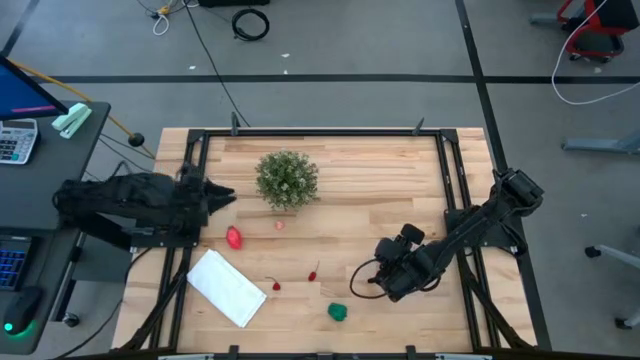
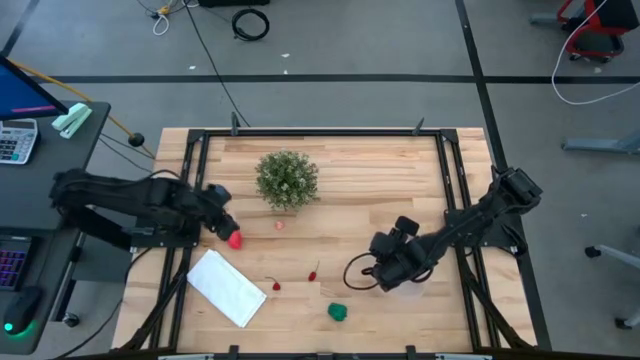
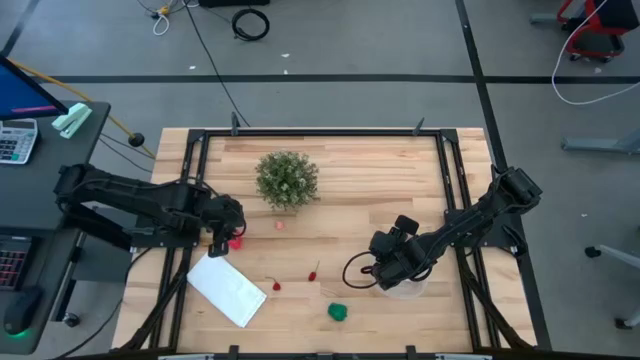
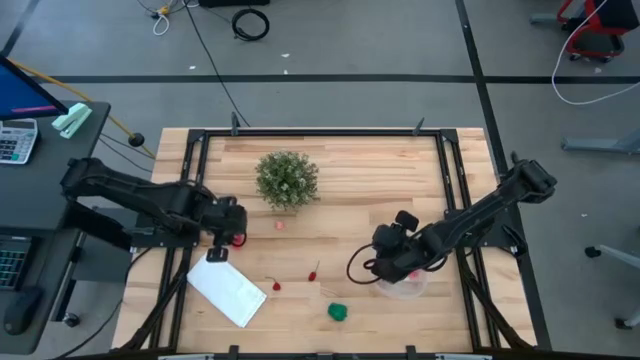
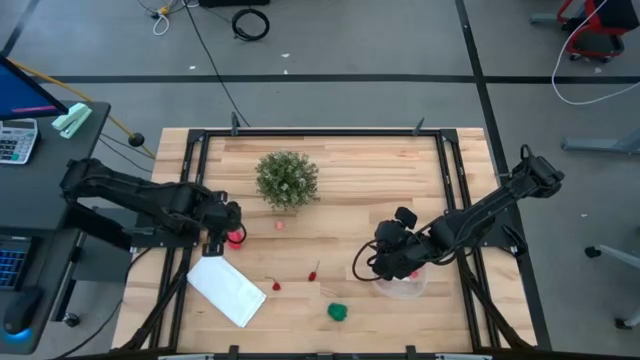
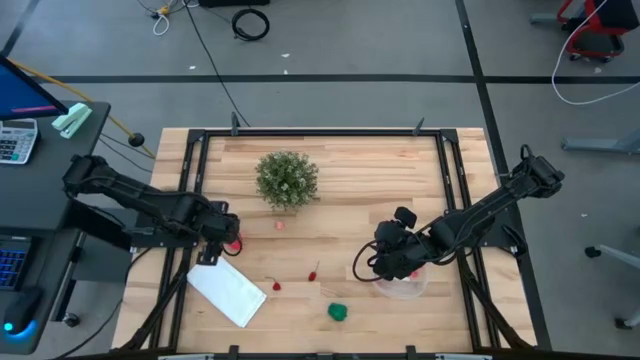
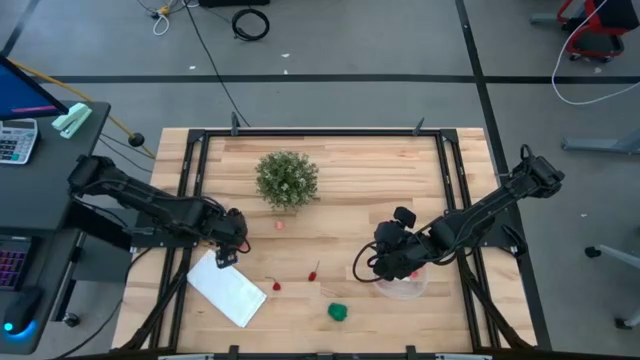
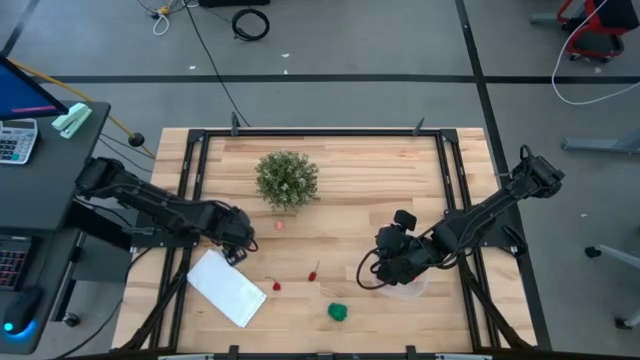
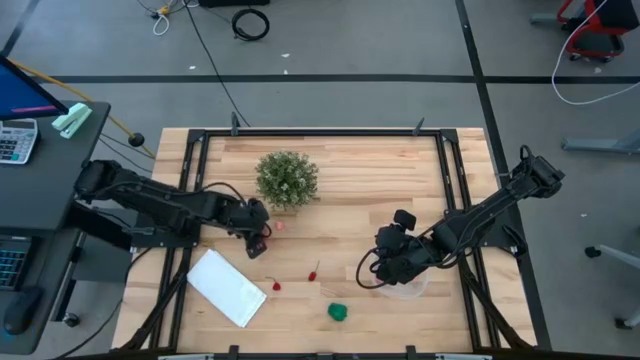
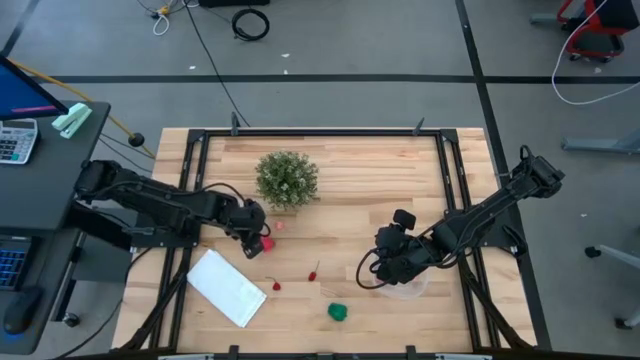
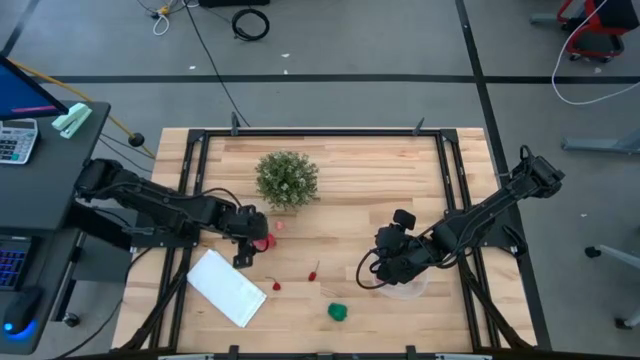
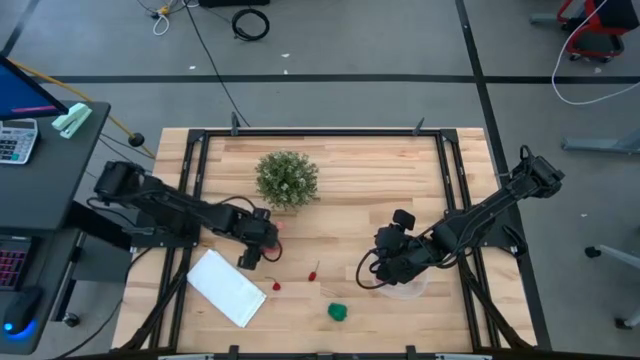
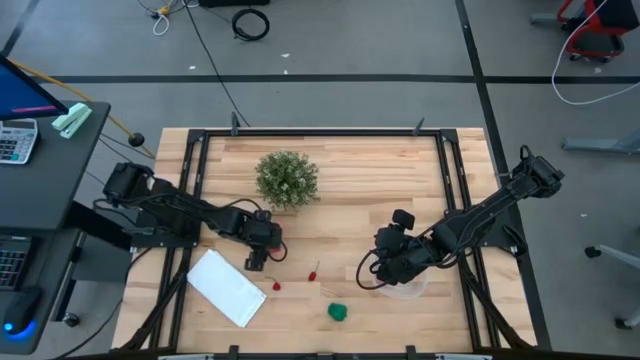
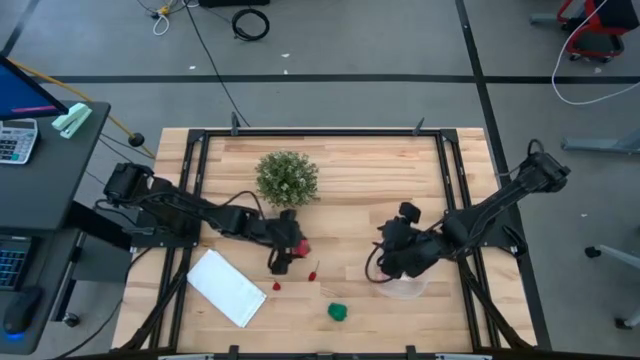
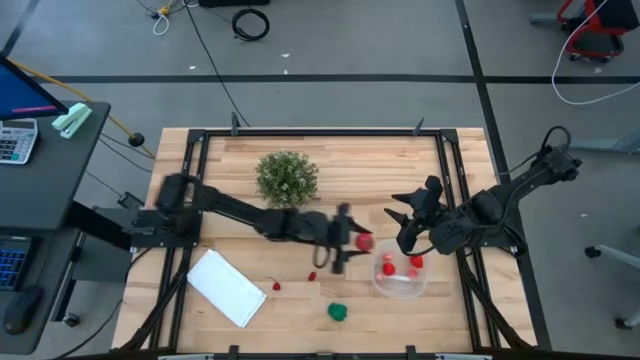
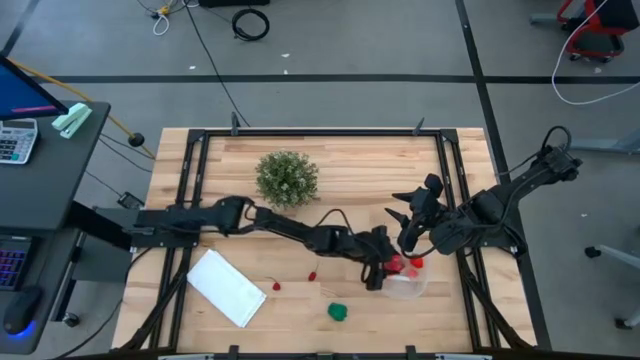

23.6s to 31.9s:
Task: Pick and placing Produce into tupperware
Put the dragonfruit into the transparent container

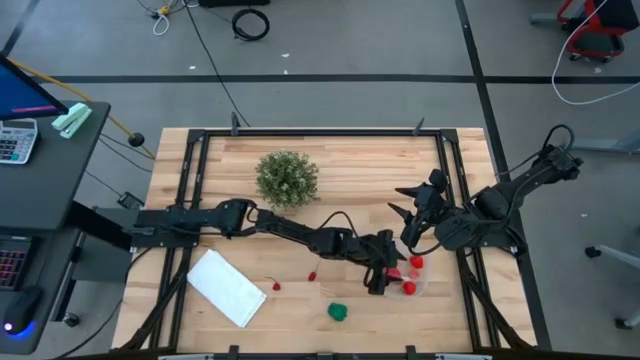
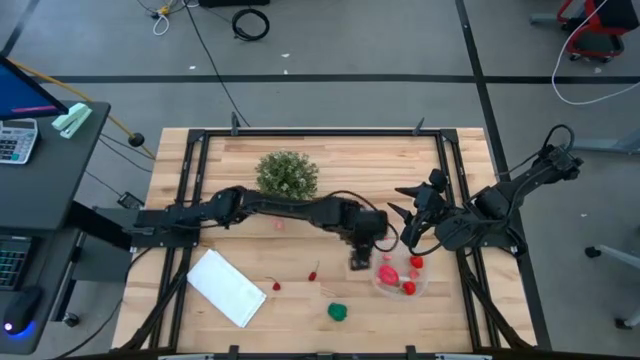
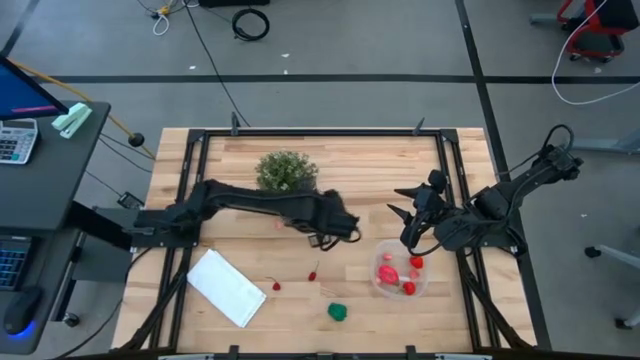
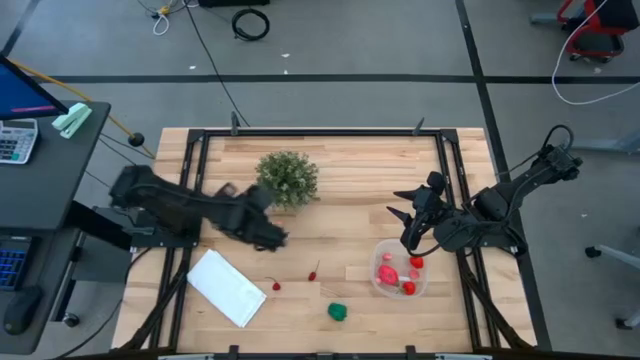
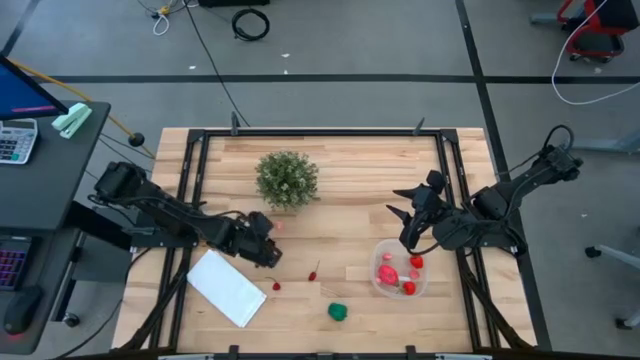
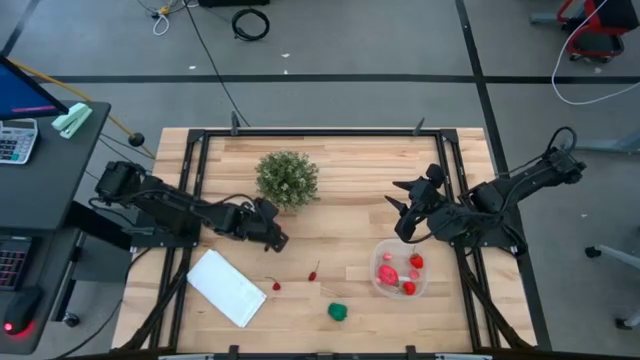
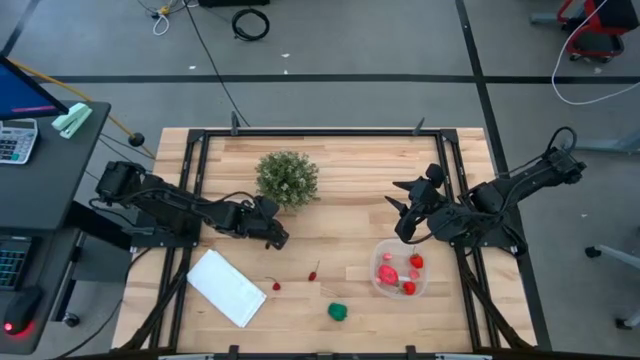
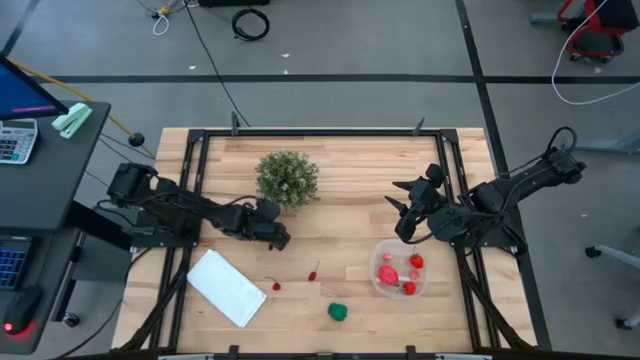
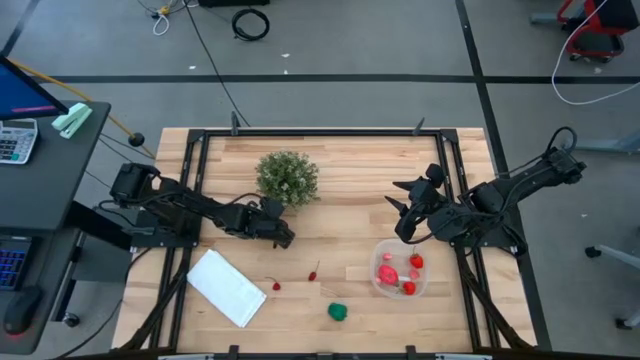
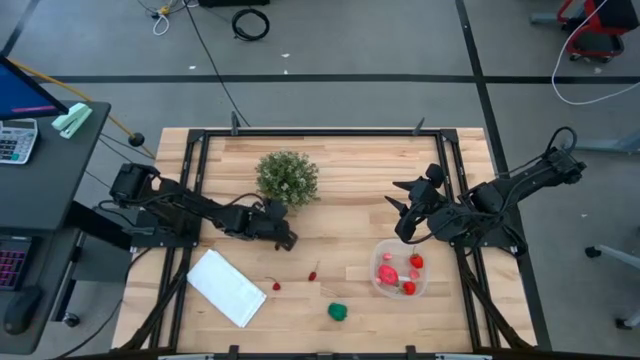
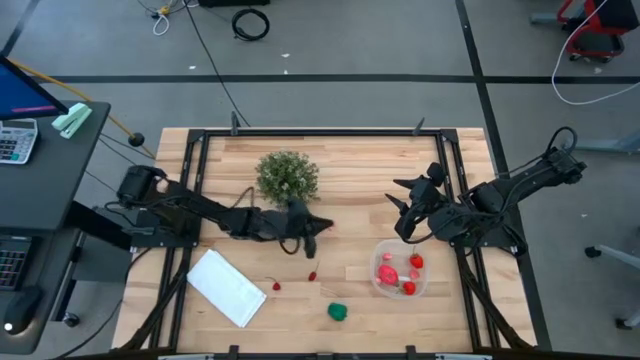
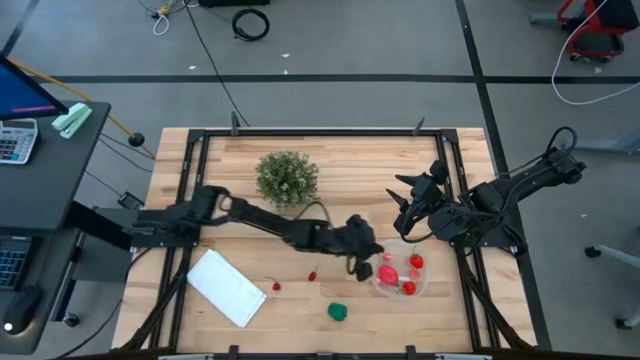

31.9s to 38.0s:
Put the apricot into the transparent container

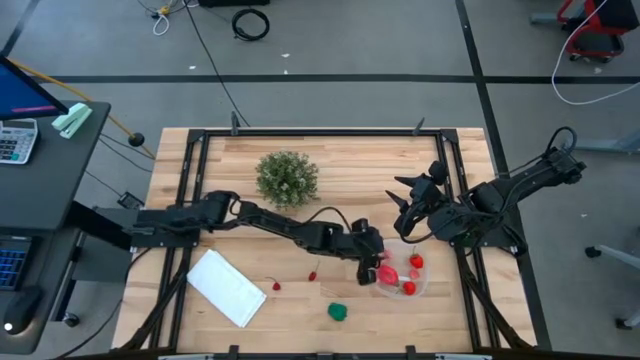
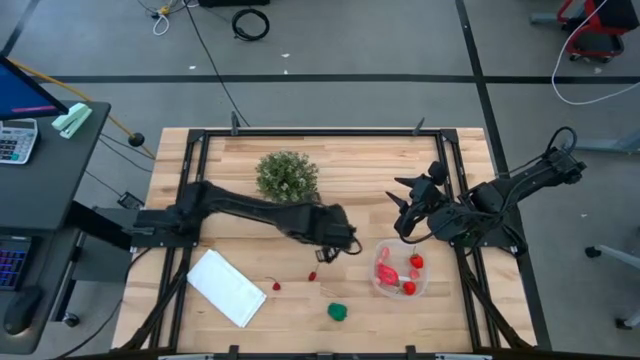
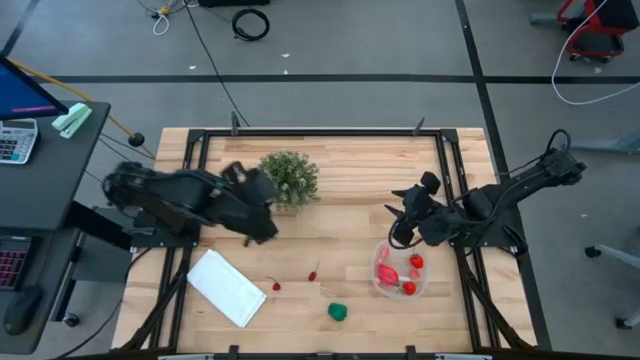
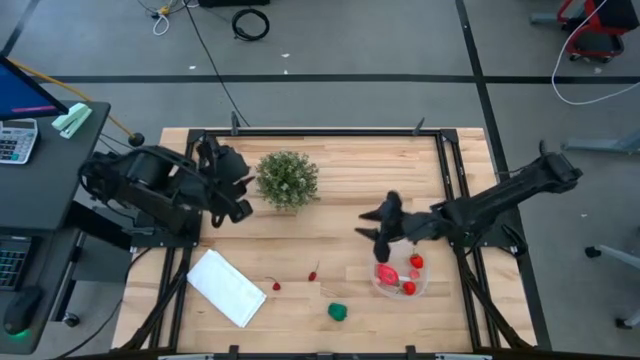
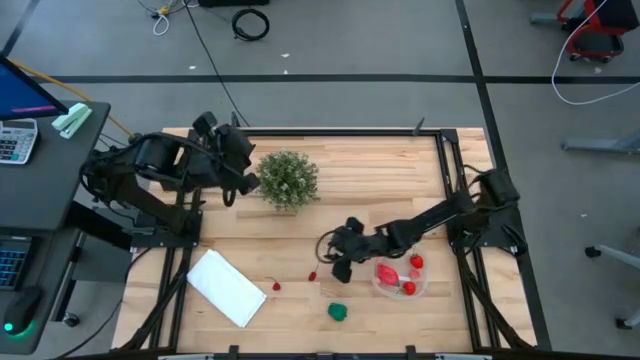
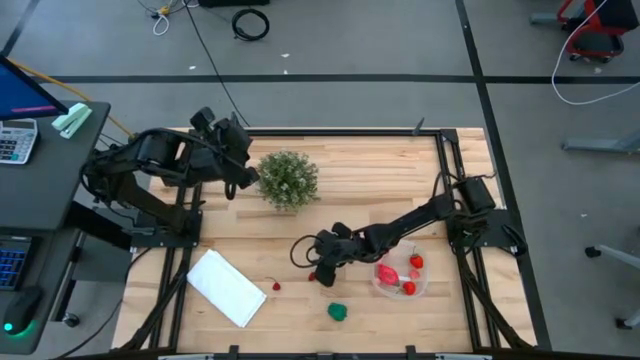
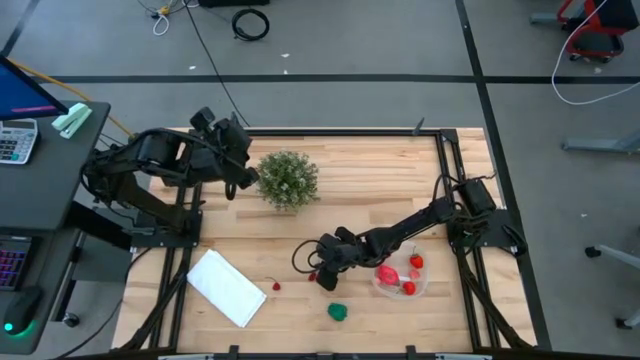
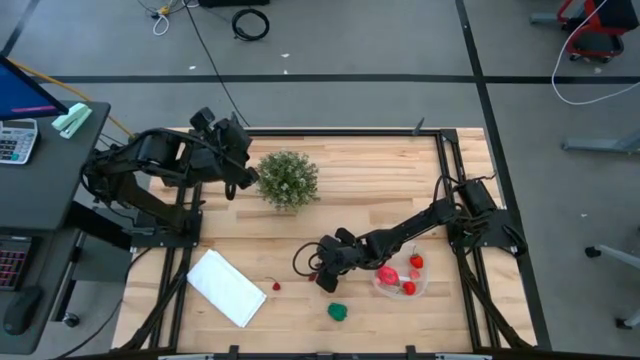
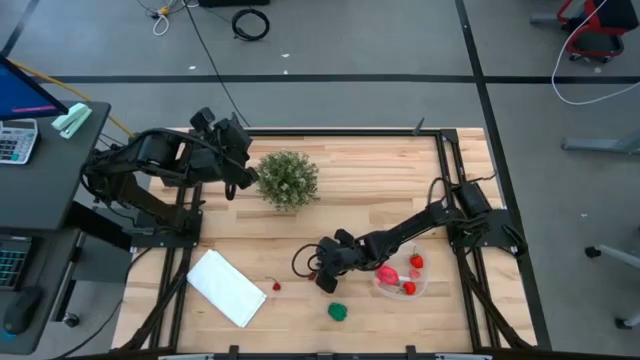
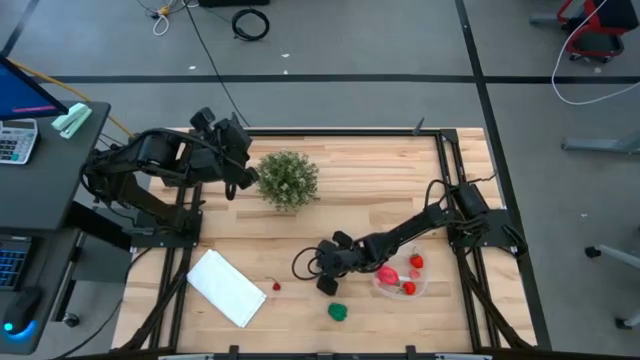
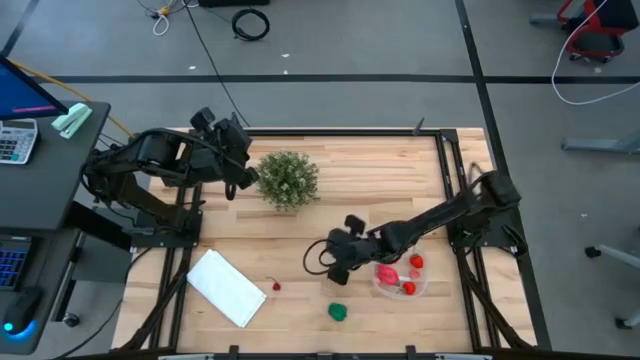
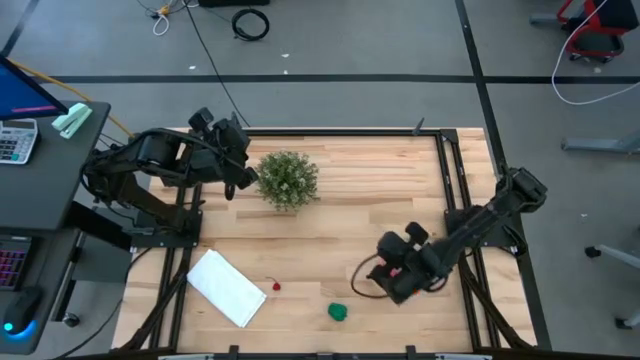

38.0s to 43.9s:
Put the right cherry into the transparent container

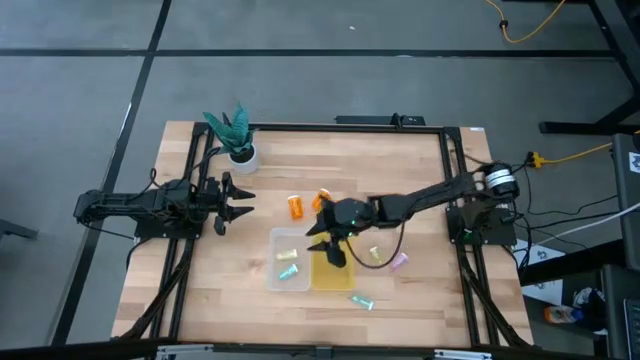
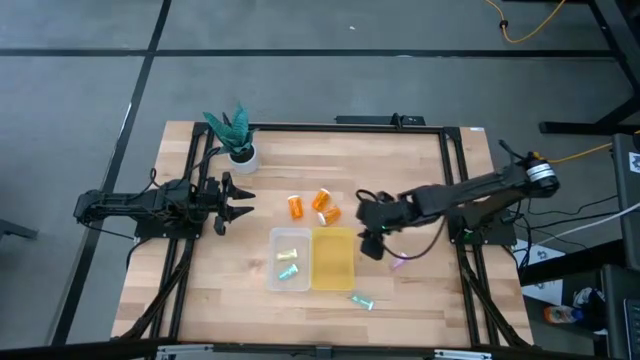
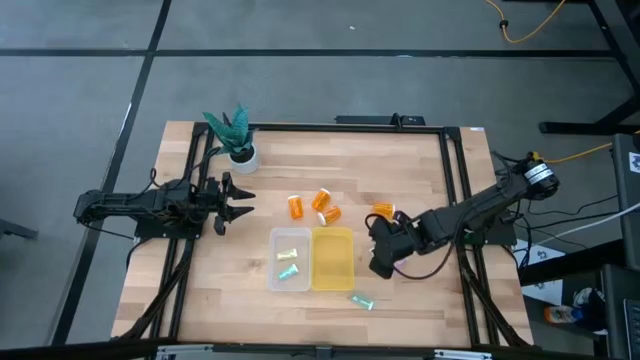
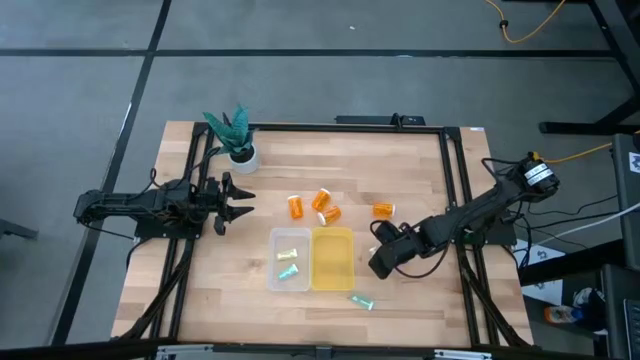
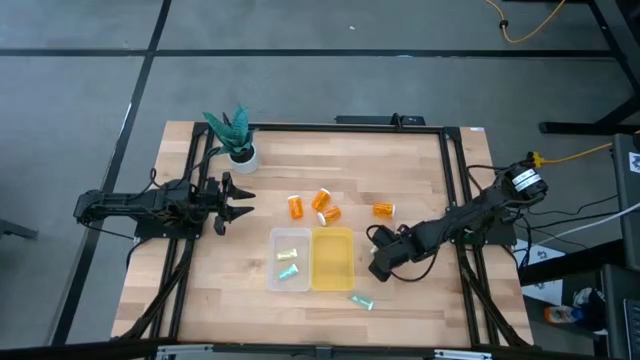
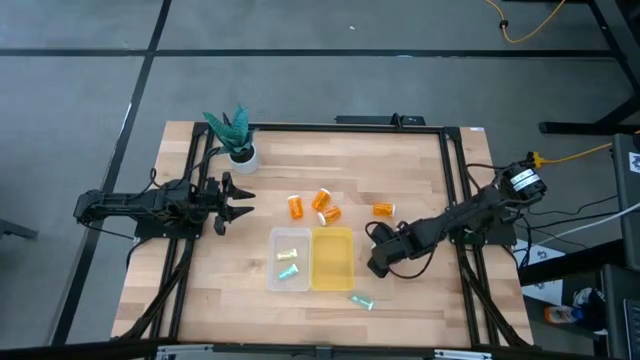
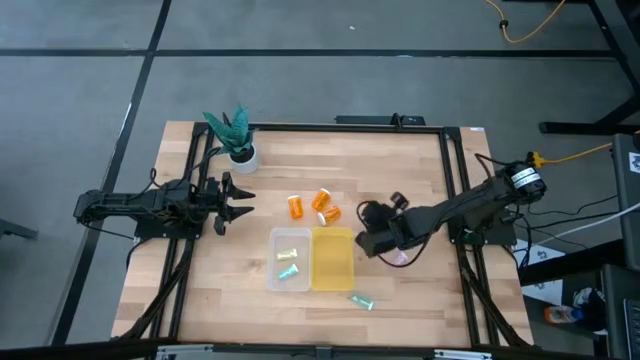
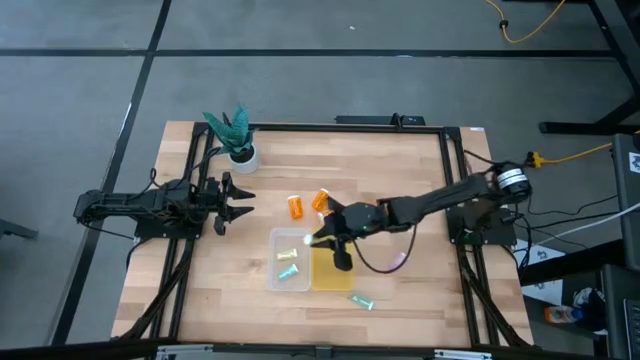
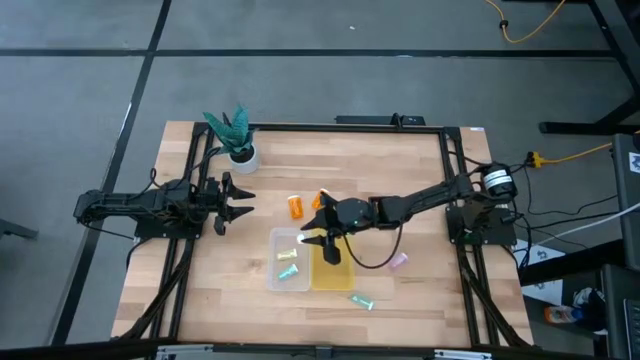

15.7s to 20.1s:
Task: Pick and place medicine bottles into bin by pill shape (circle, oval)
Put the yellow tablet bottle into the transparent bin
